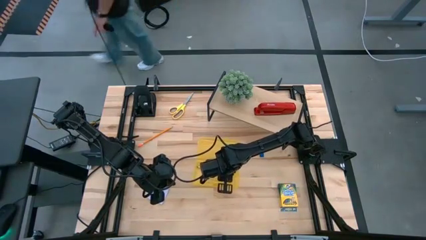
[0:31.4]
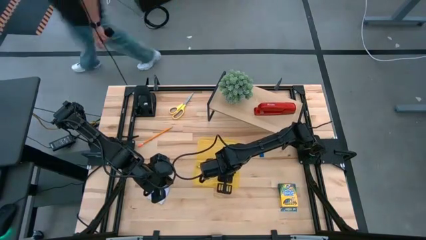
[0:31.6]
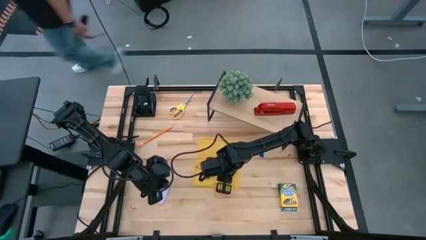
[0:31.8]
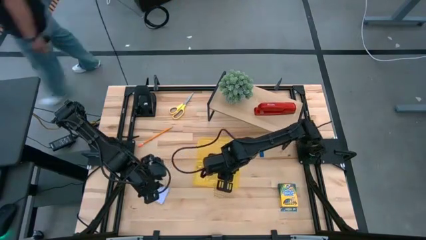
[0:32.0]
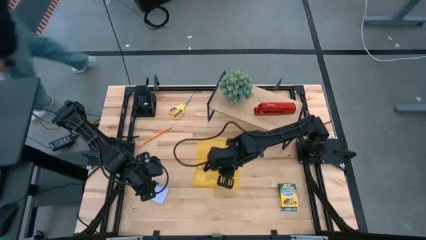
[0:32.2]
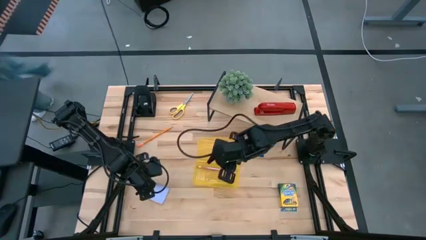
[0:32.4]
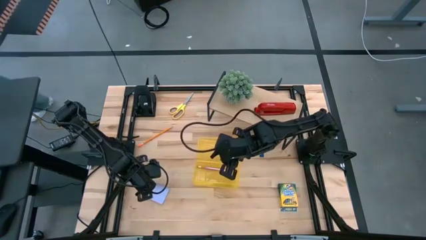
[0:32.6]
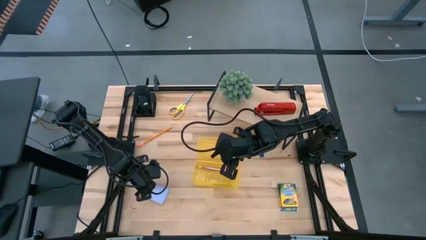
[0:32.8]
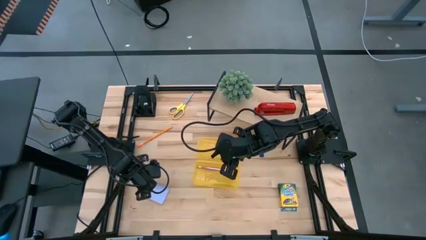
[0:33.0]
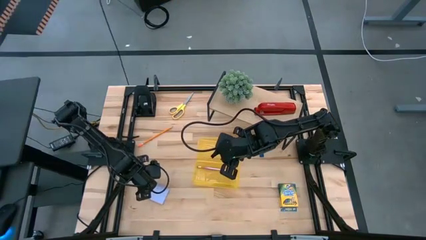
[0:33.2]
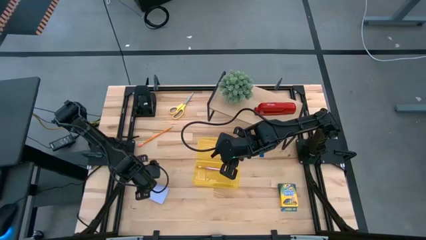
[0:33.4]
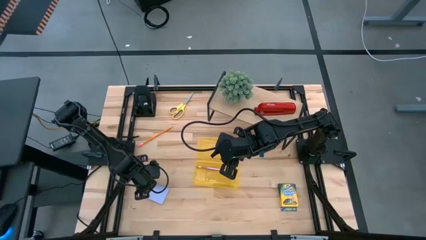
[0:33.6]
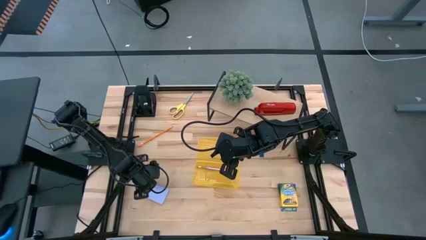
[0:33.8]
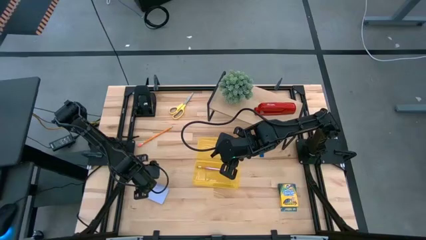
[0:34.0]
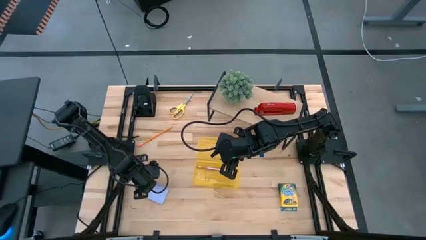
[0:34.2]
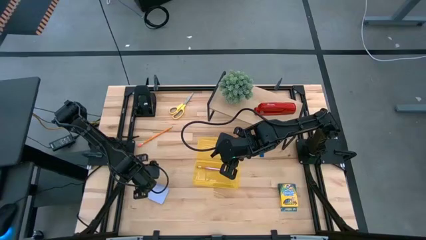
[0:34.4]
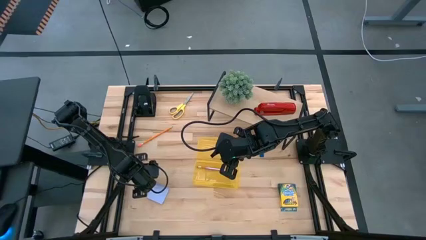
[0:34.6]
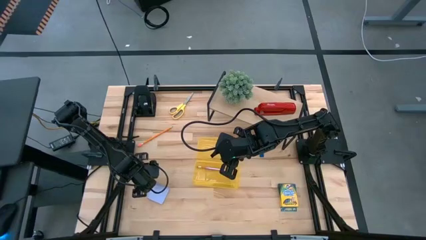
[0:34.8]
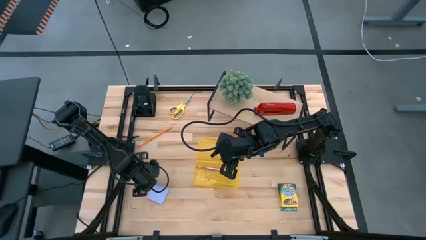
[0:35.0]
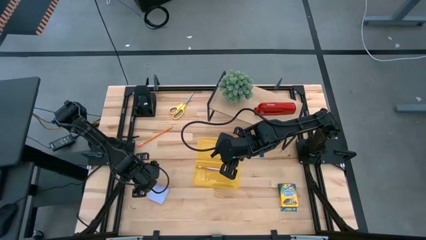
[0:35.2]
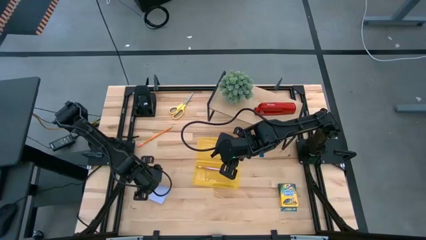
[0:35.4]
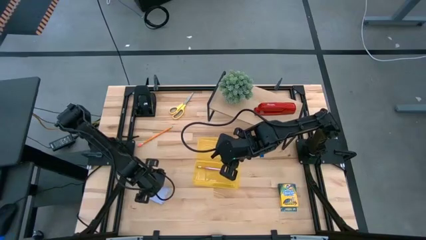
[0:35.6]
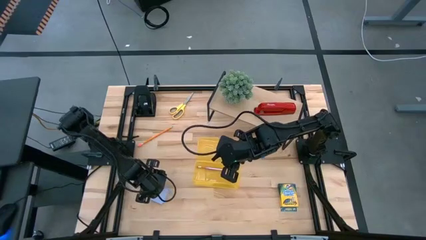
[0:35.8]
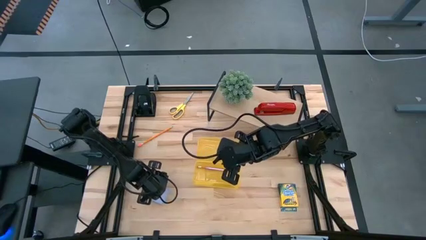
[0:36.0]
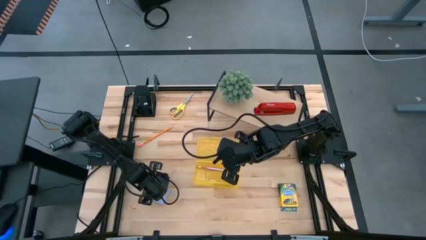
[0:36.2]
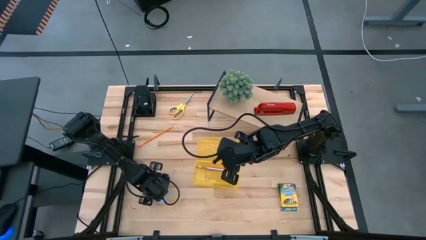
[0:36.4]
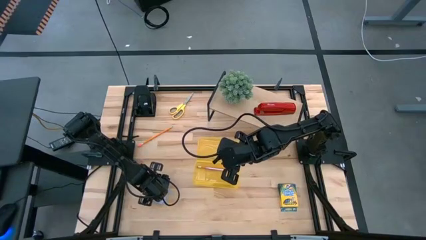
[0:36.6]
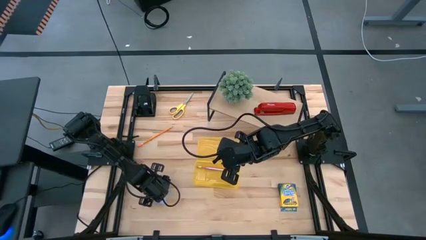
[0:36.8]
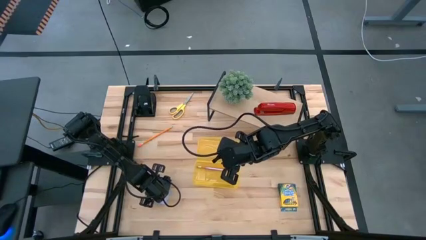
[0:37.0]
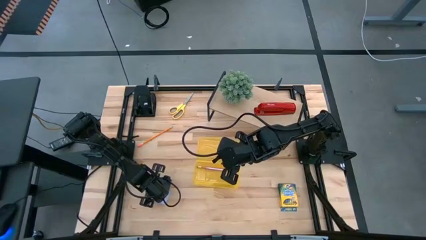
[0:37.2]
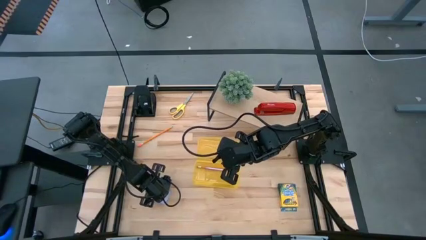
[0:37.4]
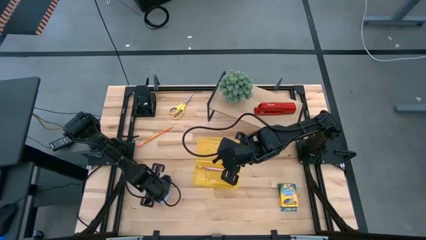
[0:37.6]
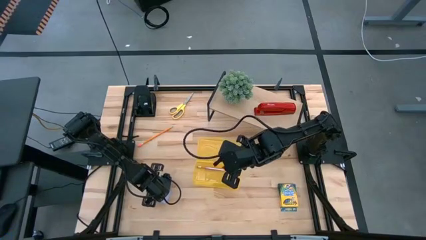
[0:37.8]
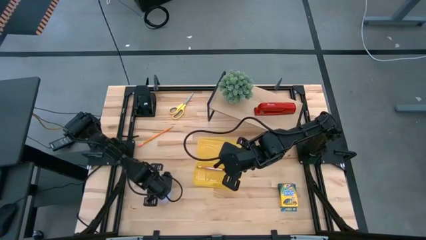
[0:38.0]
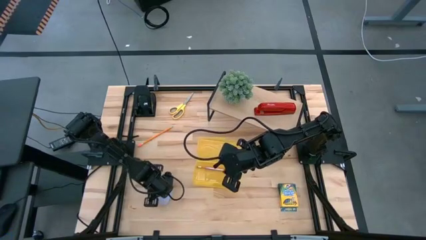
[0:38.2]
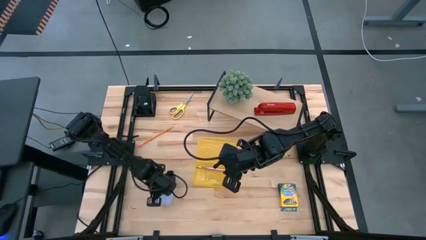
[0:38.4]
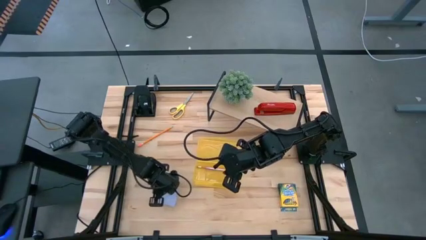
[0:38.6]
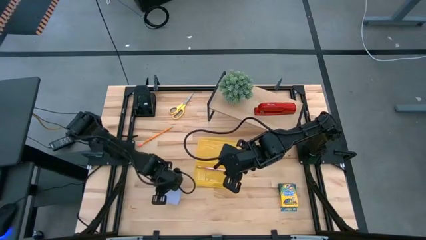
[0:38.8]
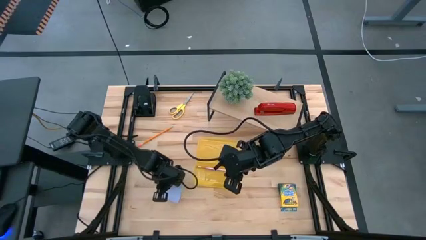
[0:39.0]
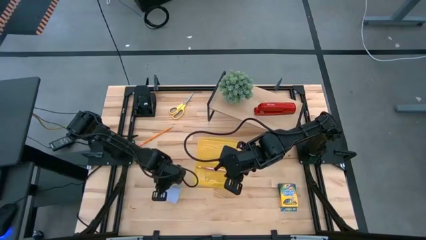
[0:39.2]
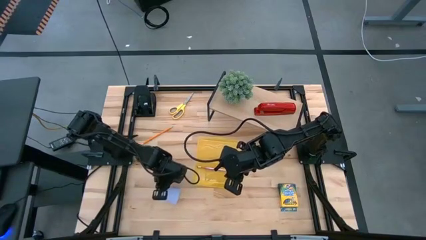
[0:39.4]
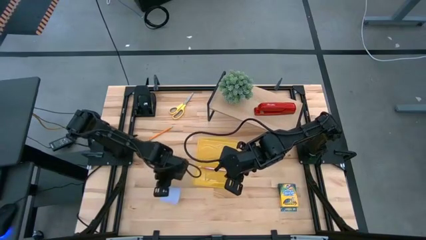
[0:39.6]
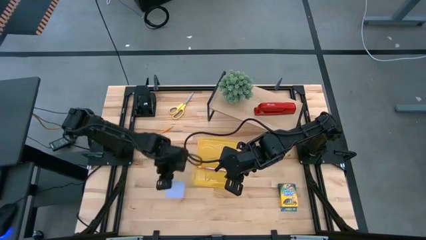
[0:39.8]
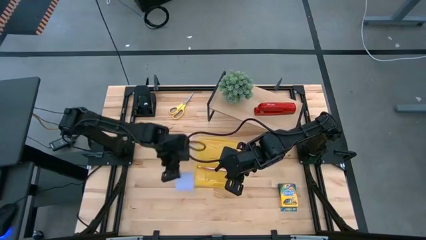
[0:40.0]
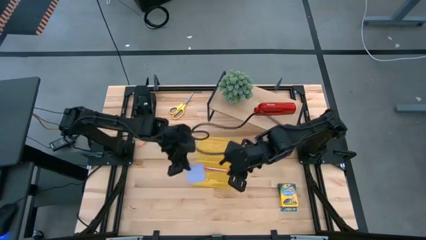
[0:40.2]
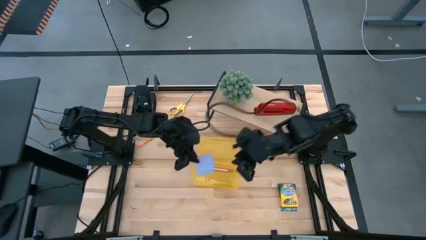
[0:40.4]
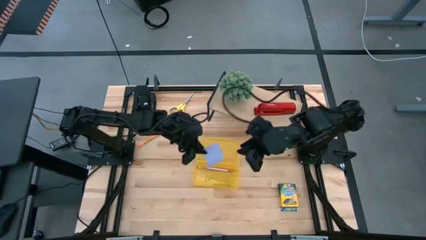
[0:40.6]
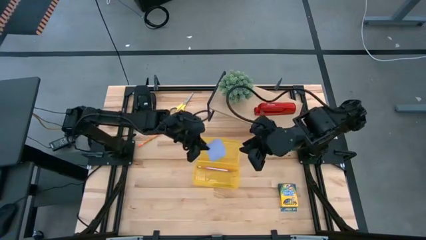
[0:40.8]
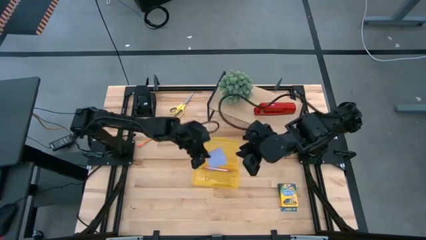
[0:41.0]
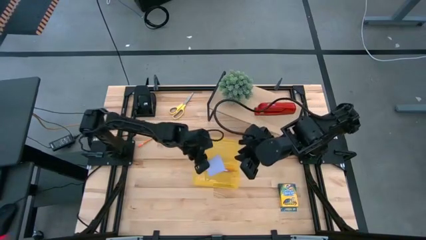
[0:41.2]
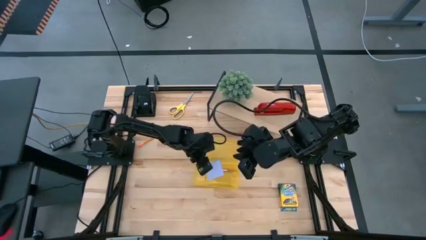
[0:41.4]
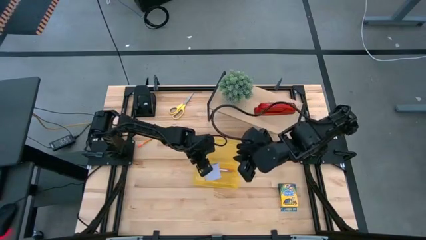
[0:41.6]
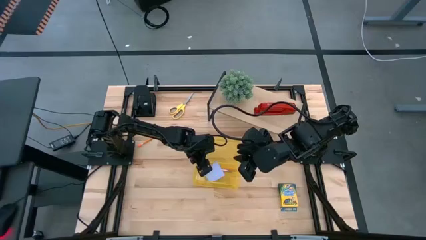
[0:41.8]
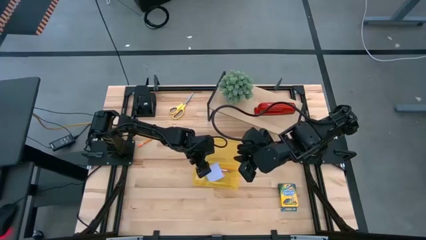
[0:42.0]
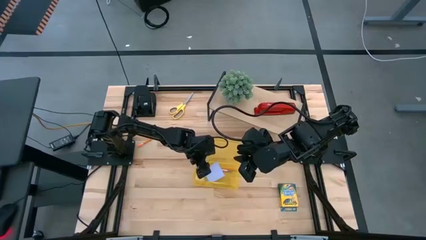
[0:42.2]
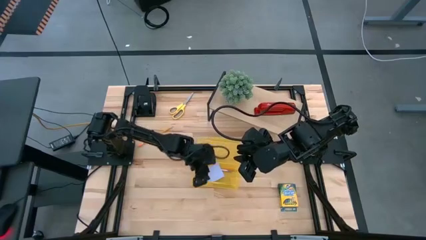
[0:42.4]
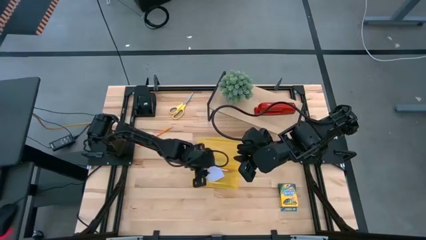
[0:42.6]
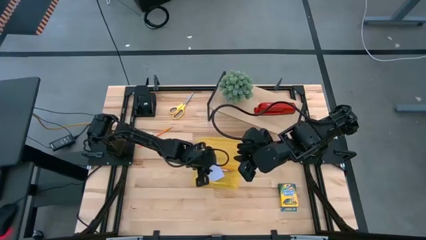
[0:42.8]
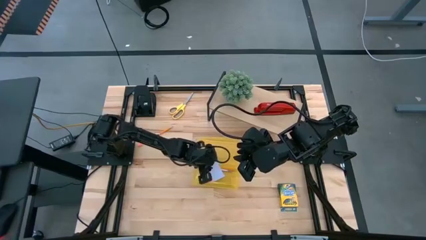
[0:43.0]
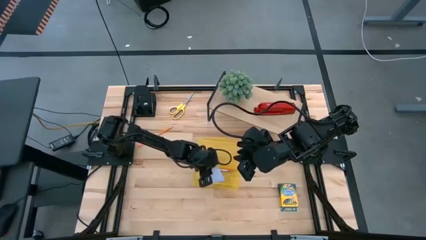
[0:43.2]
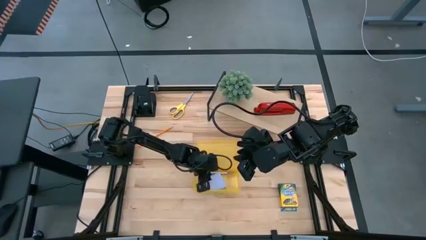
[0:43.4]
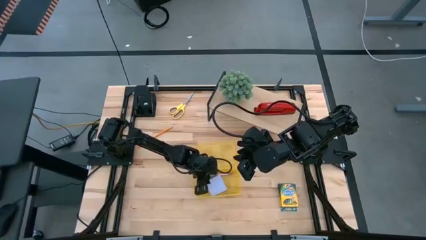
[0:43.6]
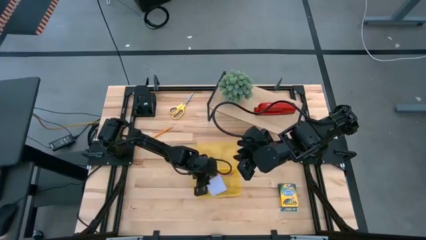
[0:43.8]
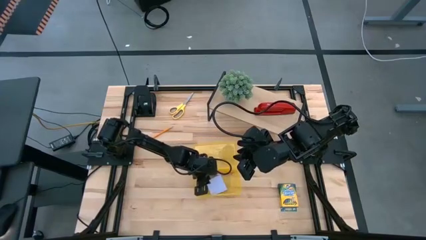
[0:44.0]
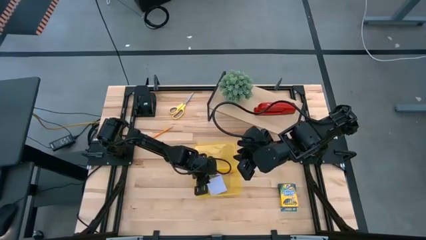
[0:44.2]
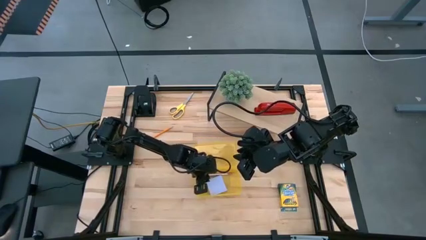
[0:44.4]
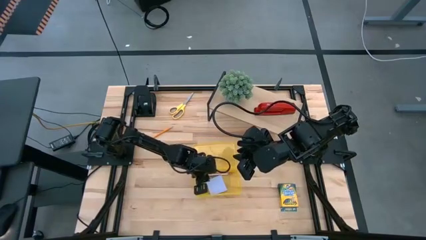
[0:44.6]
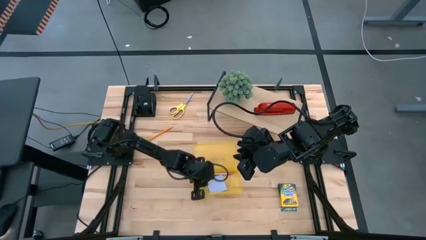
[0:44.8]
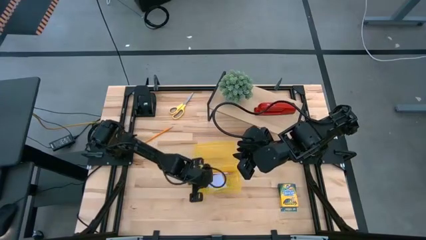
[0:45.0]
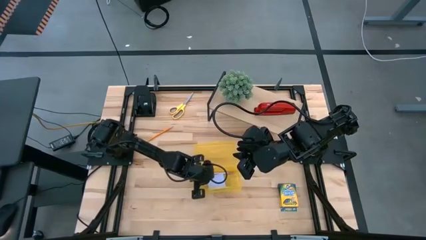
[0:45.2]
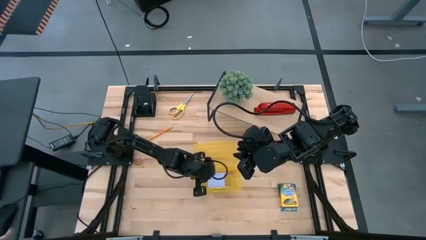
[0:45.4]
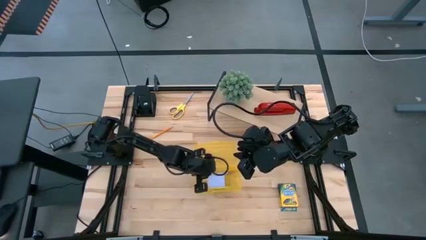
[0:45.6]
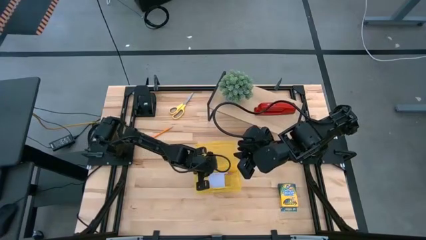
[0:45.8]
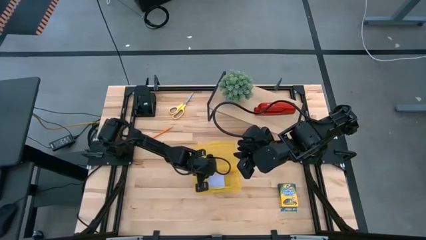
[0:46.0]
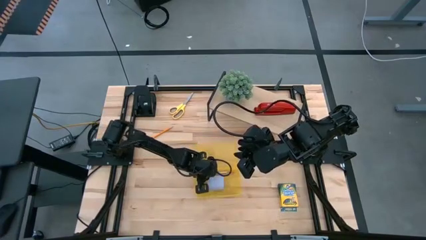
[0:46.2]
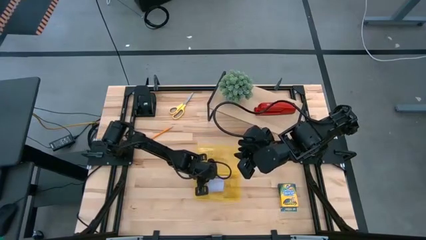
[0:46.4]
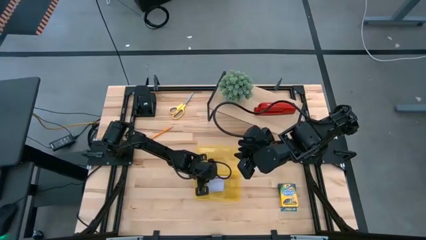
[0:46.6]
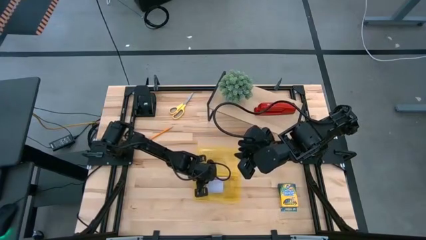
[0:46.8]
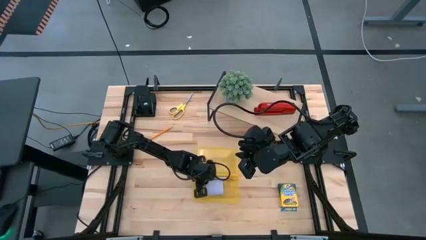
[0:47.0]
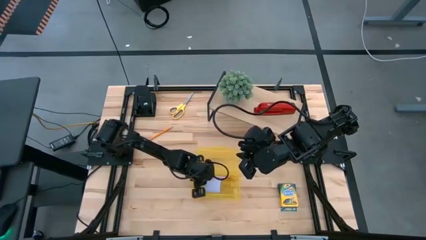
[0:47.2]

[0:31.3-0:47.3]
Task: Pack school essentials
Put the sticky note into the supply box
